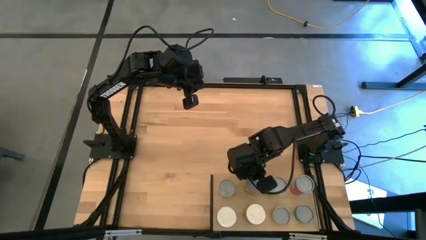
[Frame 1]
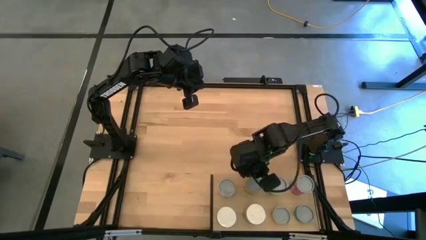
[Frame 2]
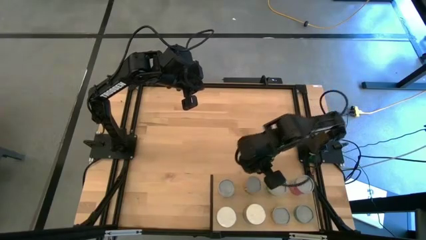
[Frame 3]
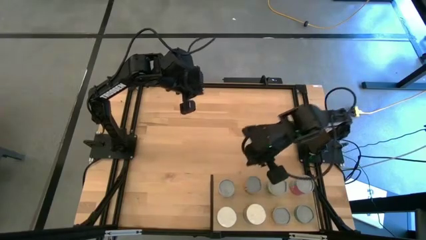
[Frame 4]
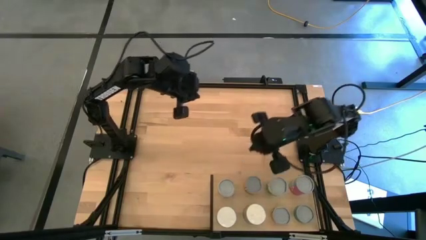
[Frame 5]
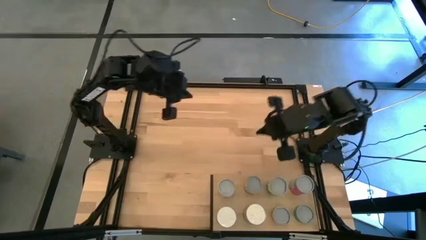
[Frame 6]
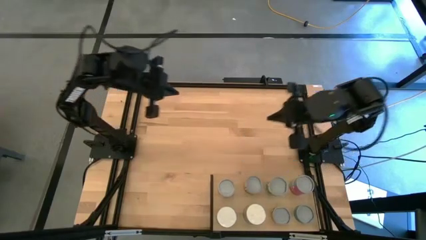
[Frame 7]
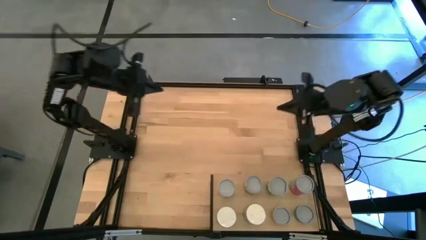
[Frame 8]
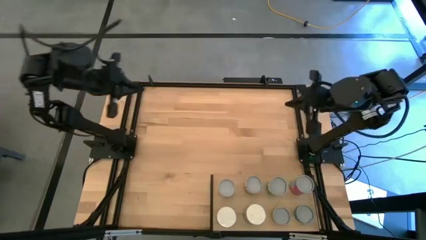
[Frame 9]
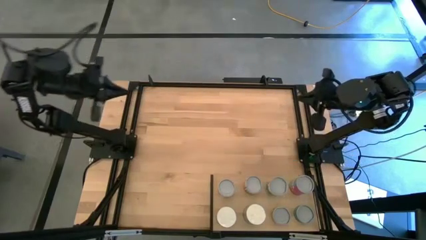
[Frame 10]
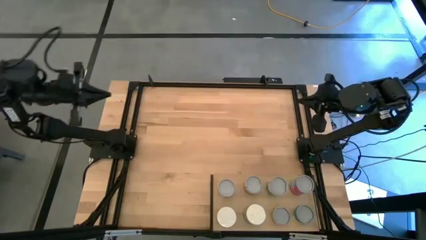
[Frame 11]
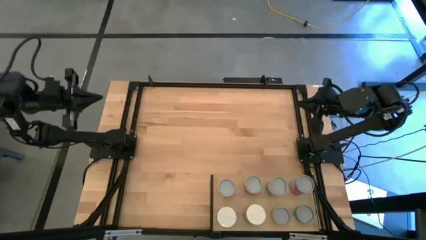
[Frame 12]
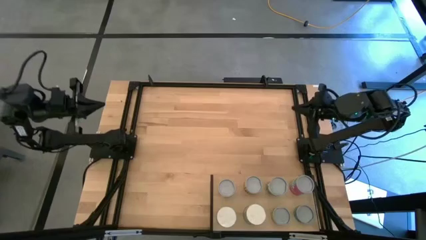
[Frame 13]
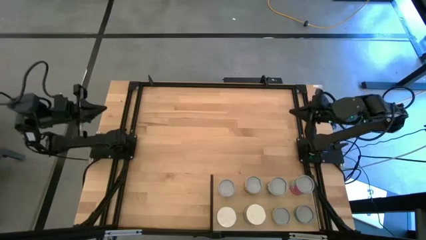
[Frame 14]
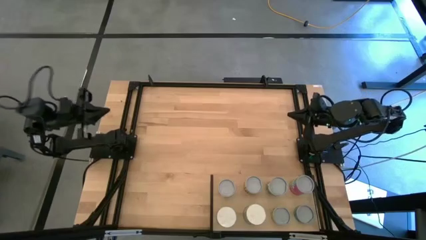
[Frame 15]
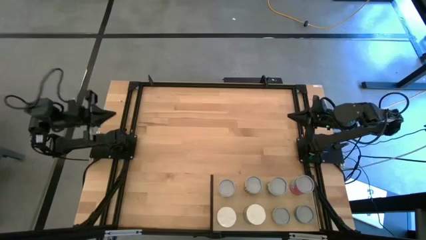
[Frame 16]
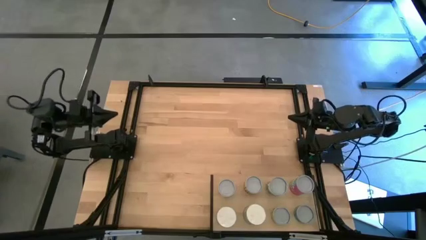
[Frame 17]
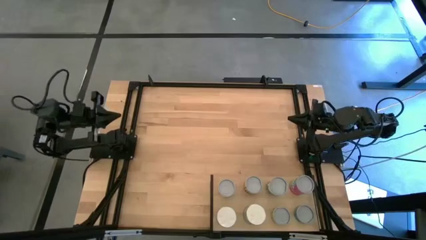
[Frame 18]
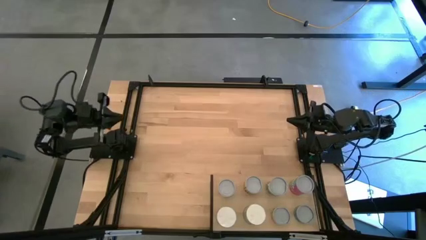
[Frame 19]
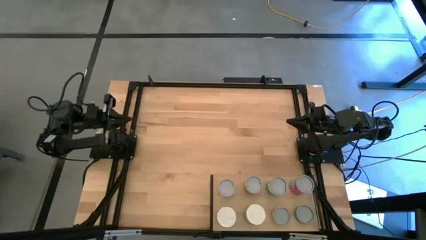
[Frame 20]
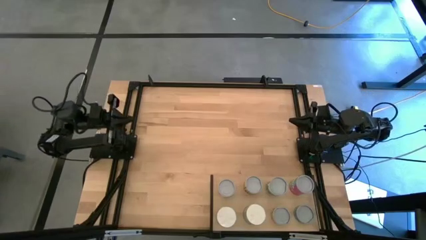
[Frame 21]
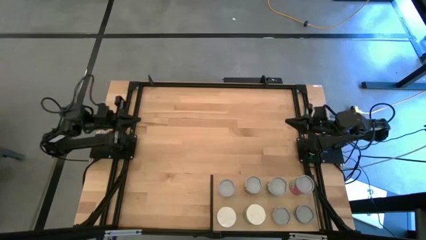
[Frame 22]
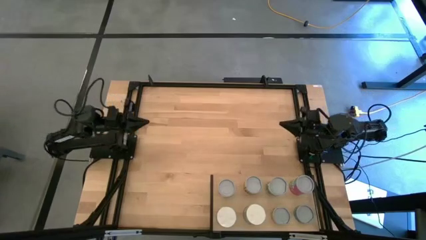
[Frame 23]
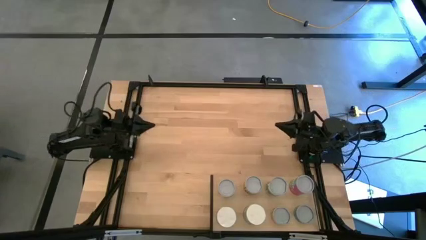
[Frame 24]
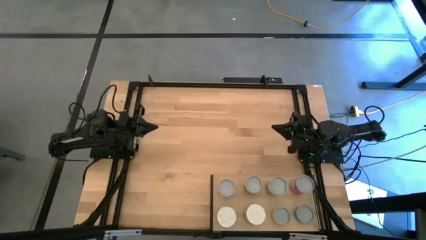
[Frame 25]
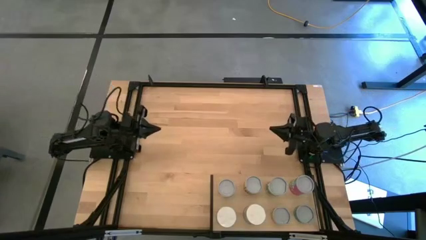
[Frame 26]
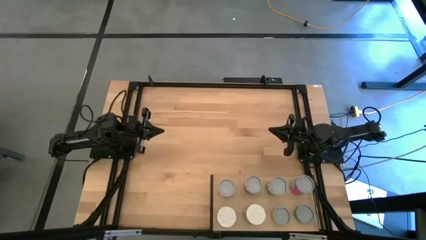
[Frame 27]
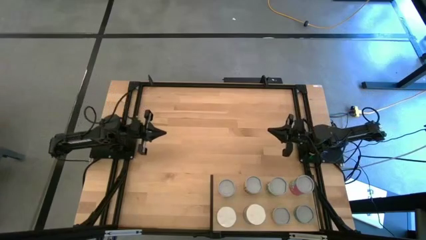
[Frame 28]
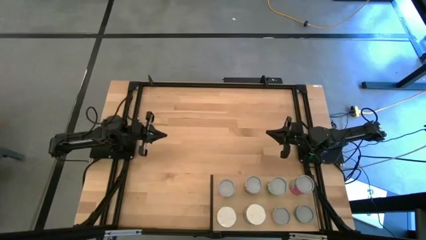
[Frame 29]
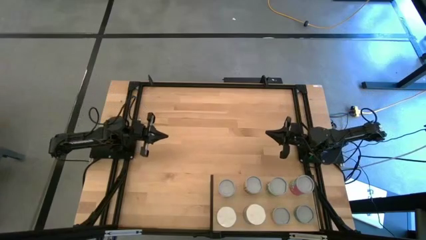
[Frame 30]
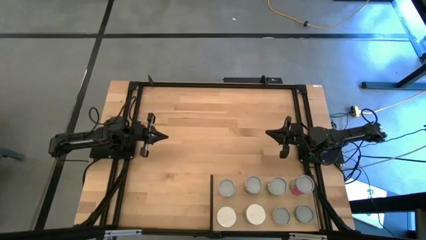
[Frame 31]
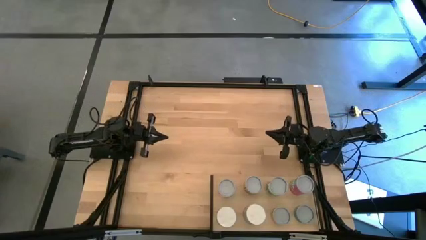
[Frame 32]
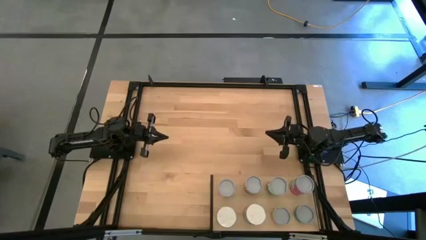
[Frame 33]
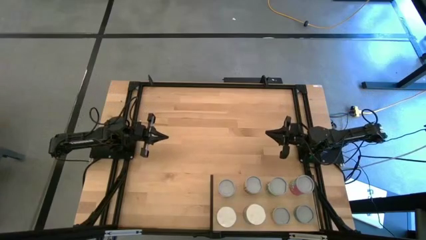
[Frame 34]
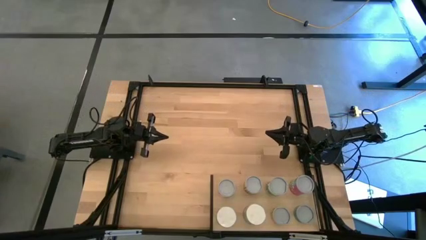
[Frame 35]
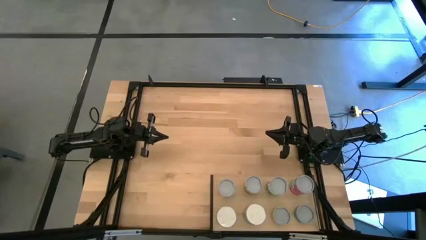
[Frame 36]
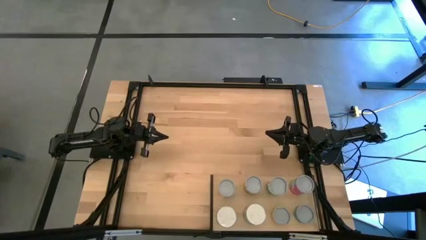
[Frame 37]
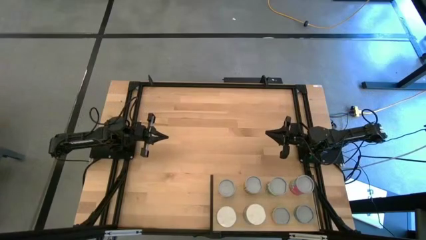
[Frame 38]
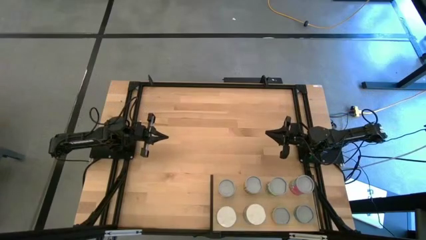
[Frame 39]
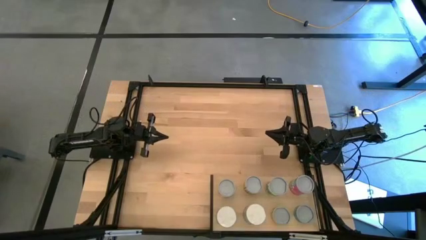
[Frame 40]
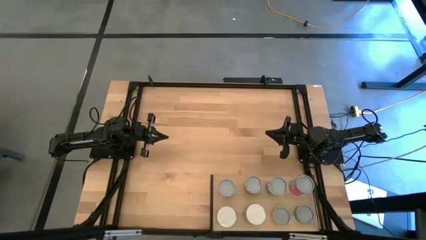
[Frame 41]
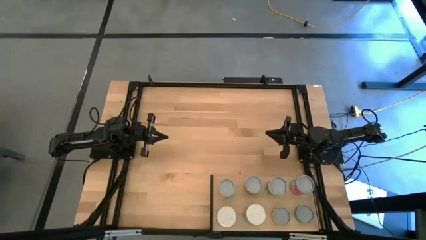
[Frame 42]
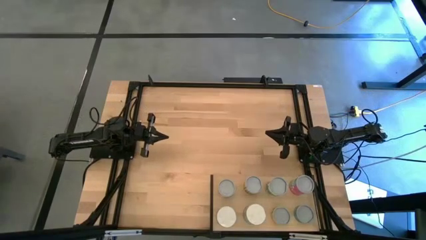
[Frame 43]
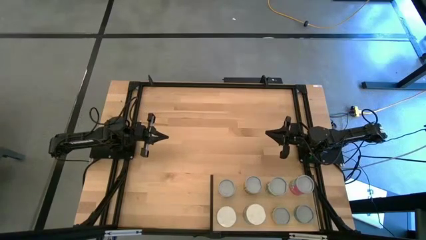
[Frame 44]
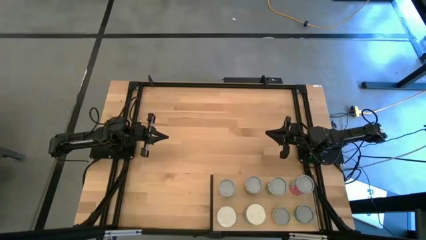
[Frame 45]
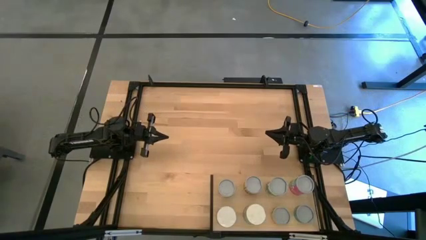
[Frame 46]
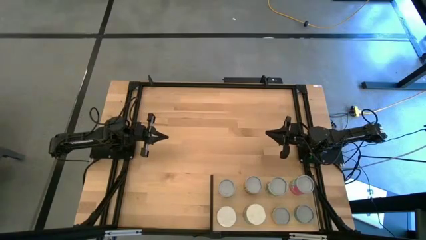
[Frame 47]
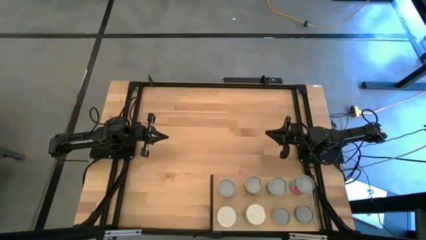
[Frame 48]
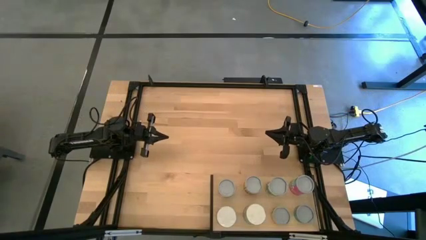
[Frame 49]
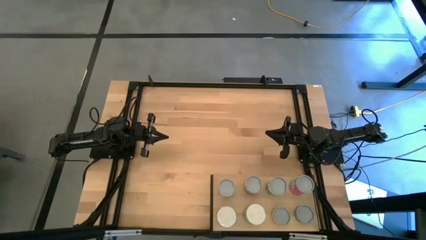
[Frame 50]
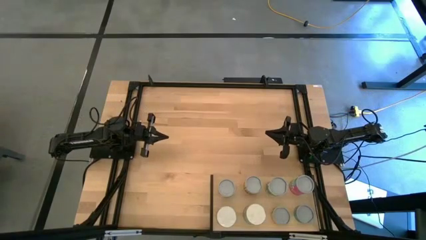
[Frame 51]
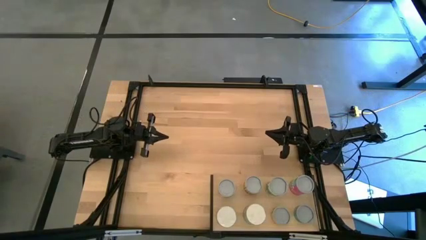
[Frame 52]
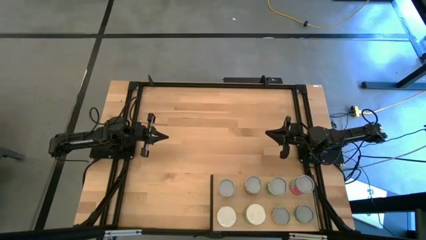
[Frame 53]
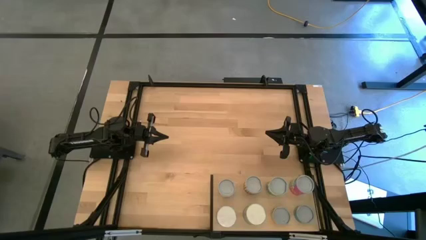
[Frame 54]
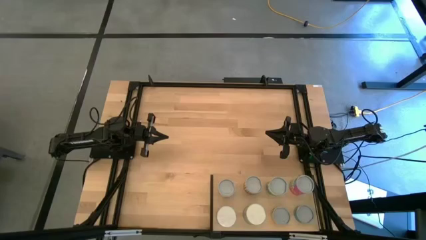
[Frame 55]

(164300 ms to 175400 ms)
Task: Pick and place cans onto a shelf
Return to Home Position

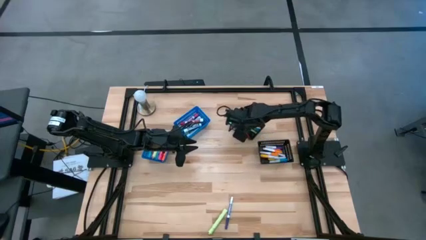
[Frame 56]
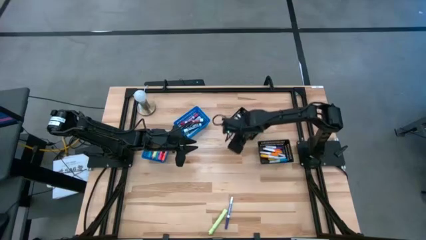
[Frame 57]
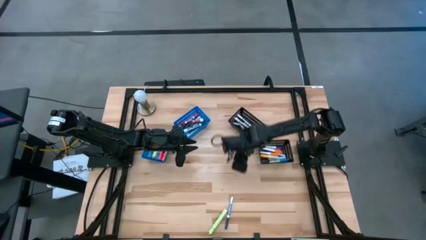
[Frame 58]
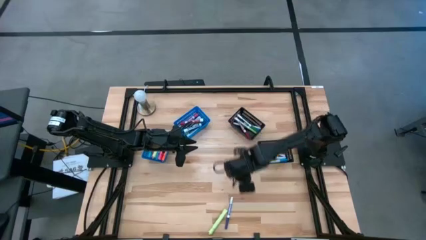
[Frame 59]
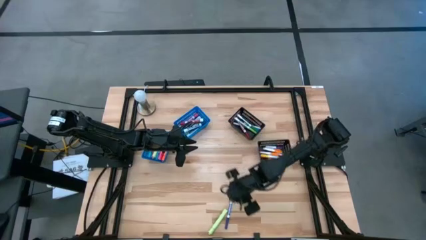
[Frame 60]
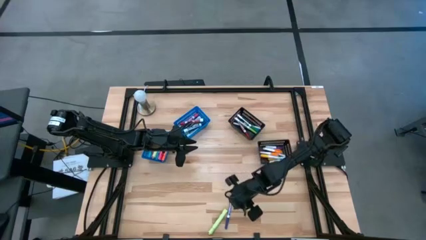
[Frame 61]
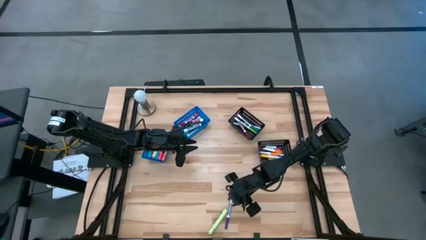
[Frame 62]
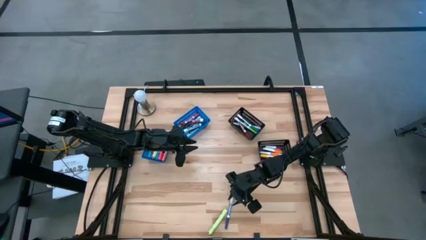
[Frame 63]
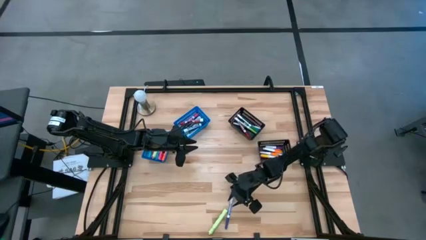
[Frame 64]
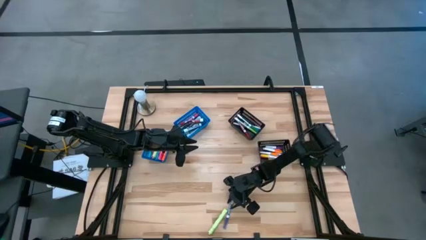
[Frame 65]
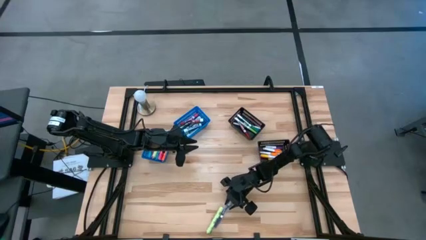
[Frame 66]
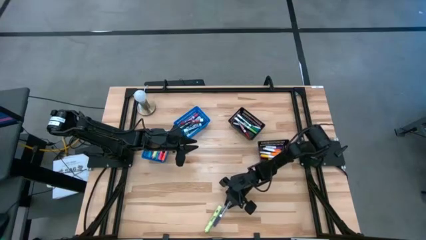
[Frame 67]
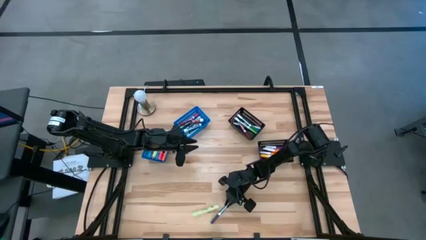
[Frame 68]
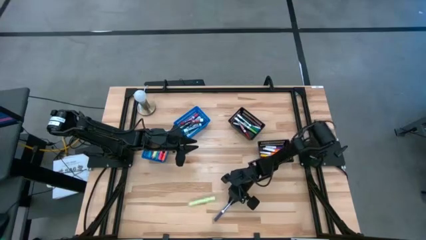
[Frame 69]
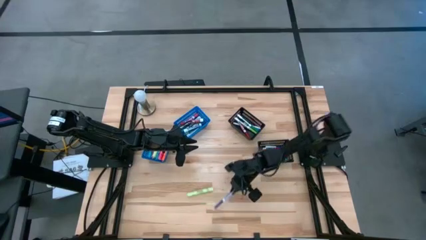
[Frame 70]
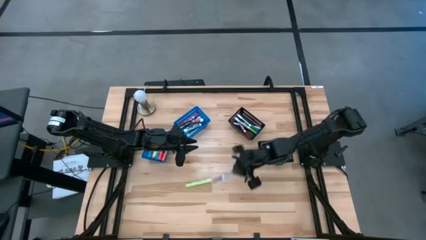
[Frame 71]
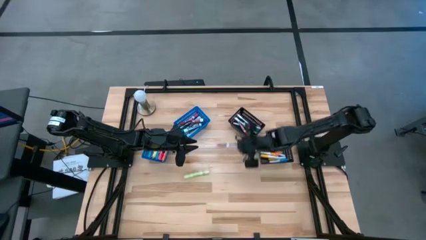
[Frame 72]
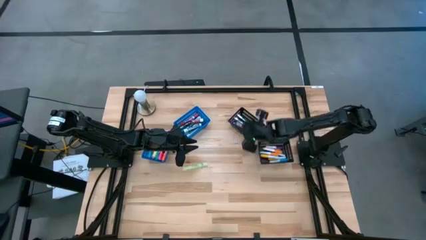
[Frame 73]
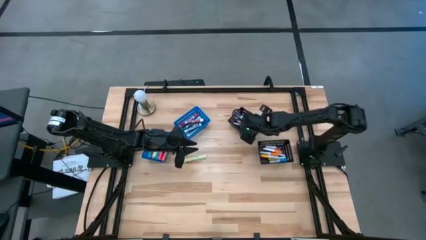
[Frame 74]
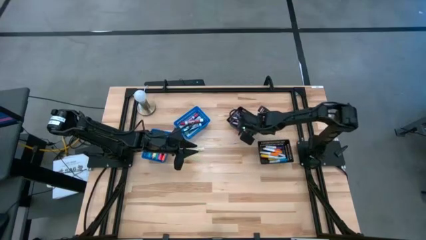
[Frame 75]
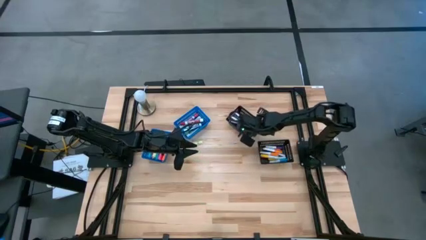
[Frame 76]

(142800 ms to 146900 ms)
Task: Pick & Place Markers
Put the purple marker pen into the top black bin
